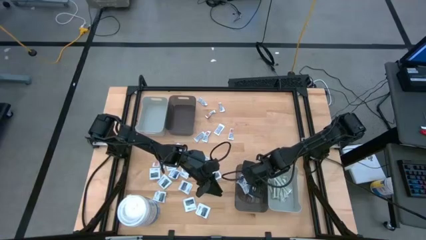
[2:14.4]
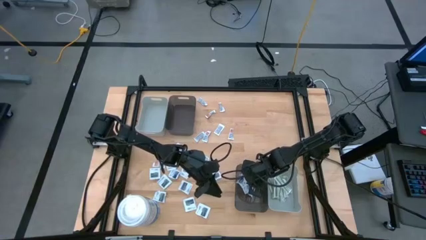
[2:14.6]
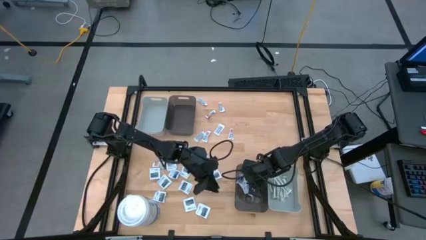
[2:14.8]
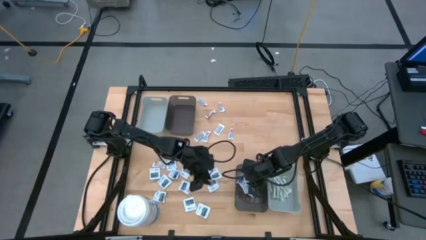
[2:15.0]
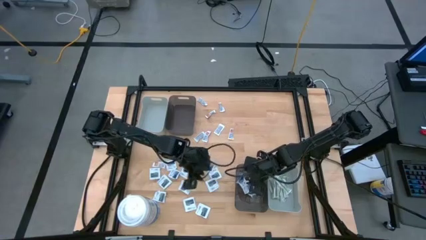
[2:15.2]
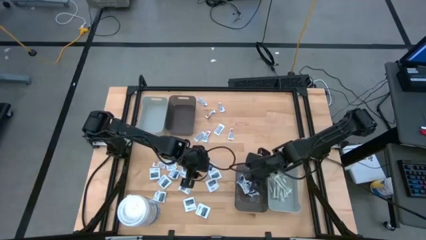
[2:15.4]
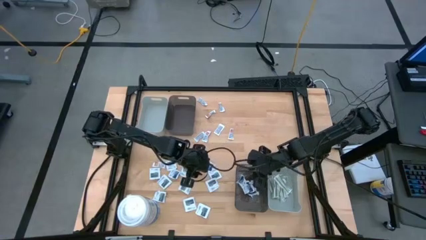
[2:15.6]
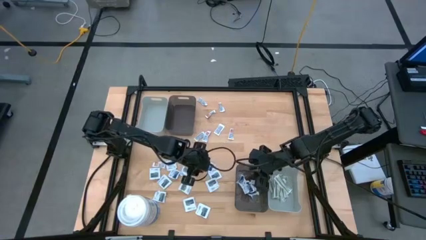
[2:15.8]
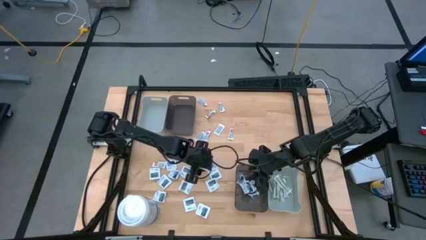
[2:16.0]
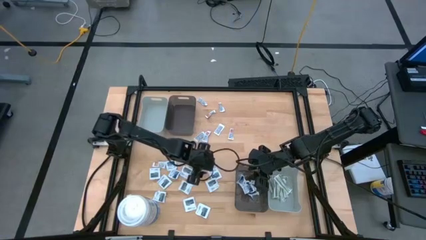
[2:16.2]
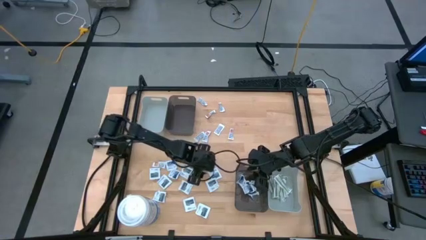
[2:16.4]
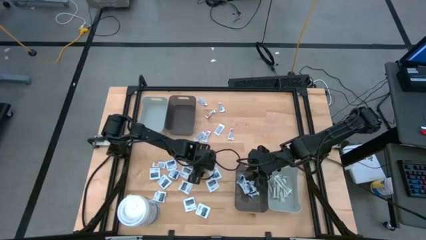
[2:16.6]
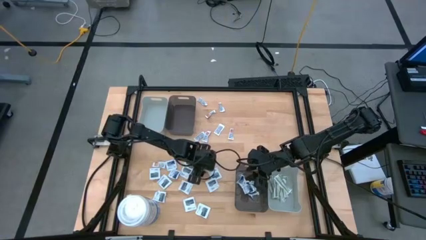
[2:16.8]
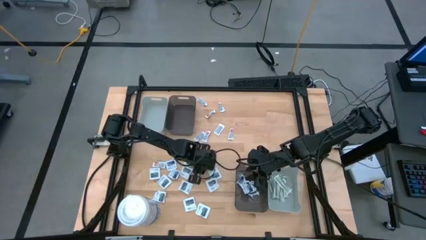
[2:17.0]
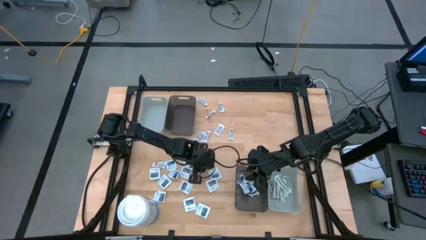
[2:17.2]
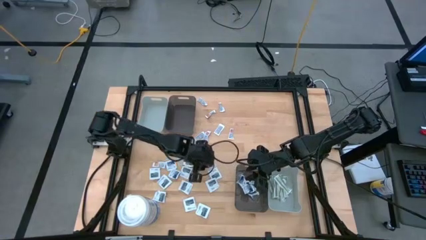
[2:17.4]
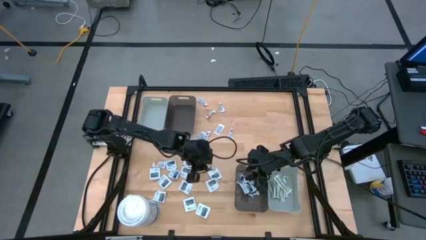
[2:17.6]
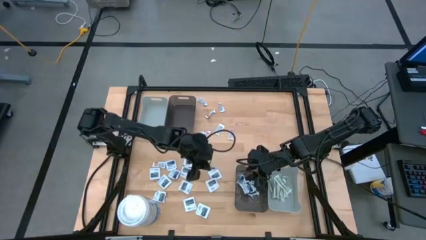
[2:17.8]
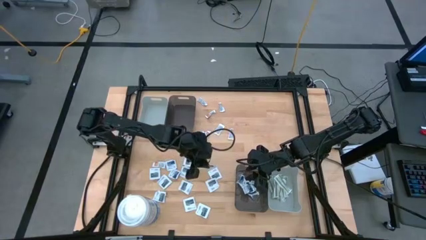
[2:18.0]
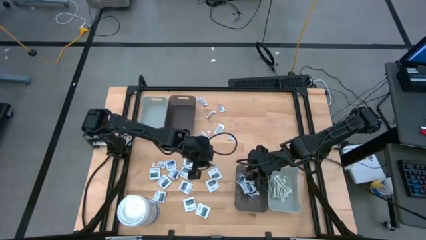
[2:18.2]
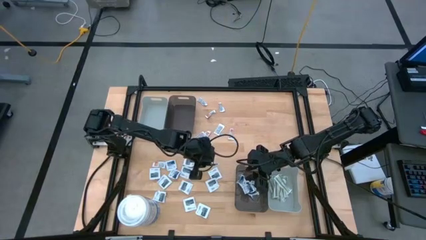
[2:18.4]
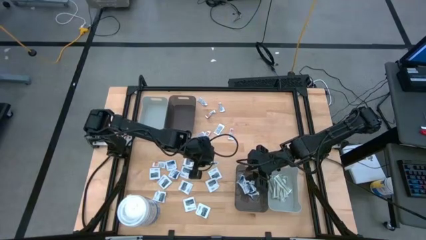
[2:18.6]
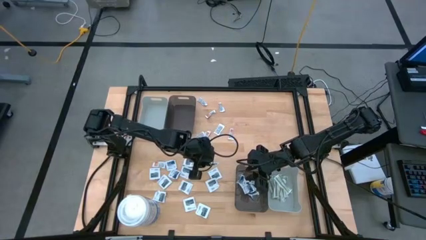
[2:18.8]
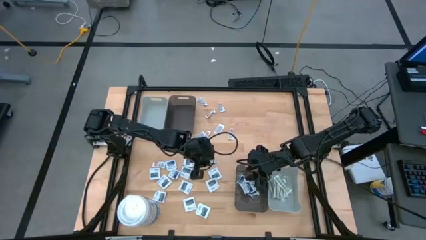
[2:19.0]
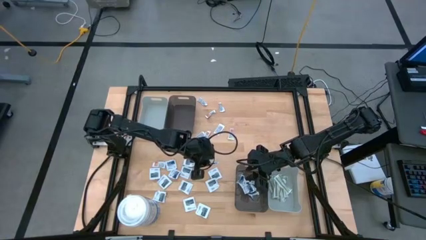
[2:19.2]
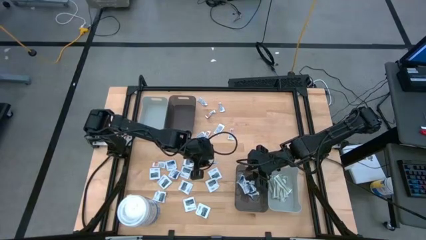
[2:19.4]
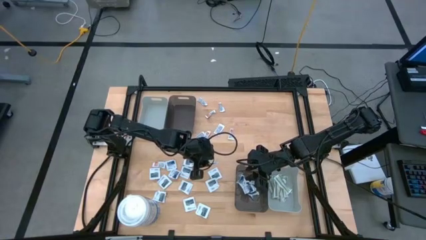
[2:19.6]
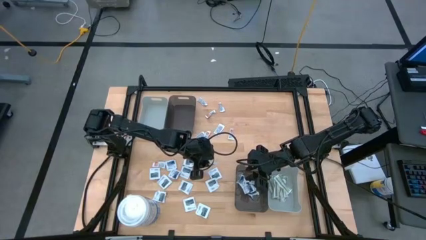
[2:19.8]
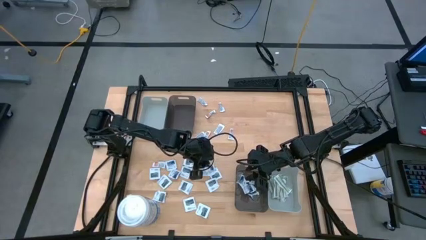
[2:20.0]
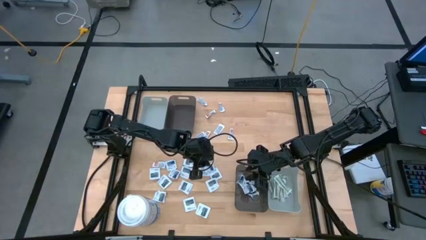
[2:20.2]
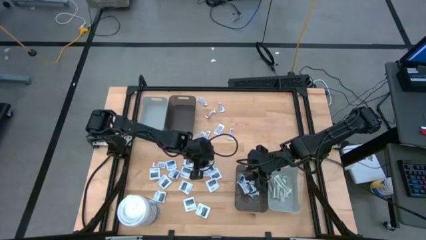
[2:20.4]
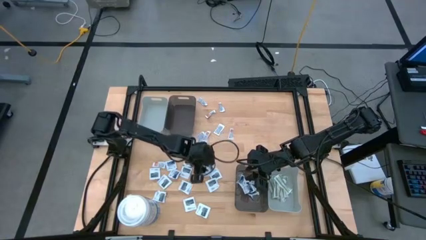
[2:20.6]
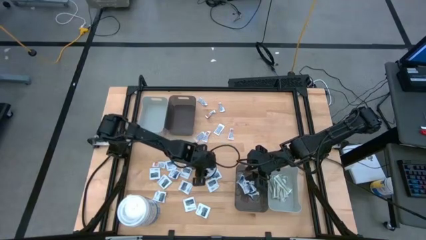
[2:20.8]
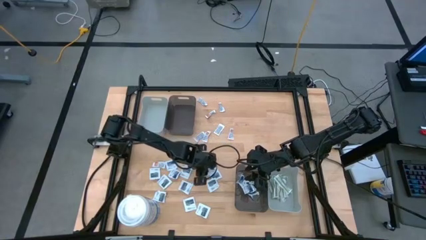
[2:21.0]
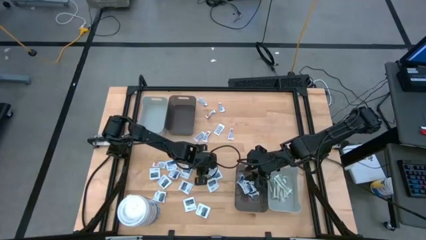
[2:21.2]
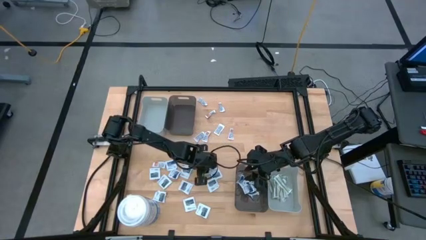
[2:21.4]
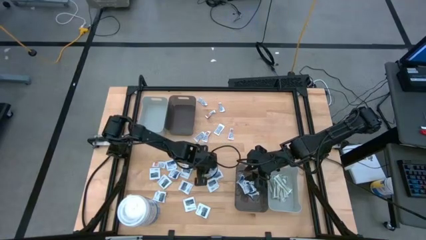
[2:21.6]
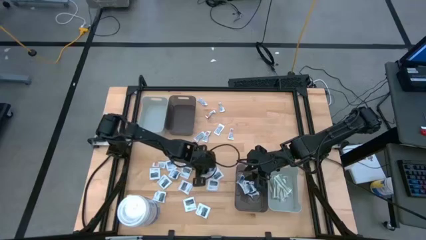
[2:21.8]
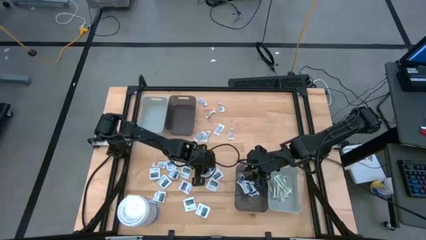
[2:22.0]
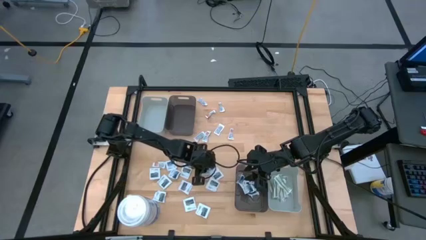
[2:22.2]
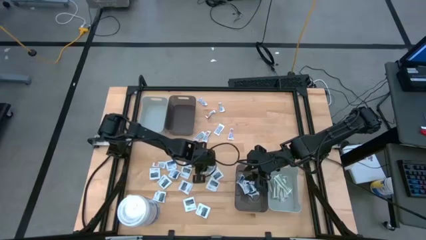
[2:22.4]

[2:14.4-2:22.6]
Task: Pick & Place First Aid Supplies
Put the white alcohol pad into the bottom black bin

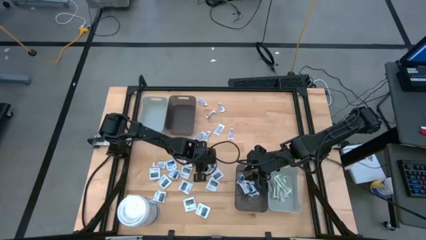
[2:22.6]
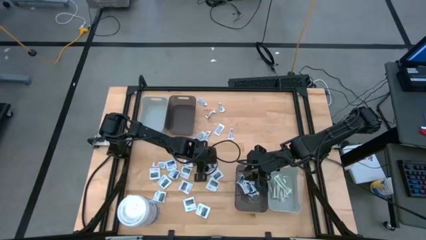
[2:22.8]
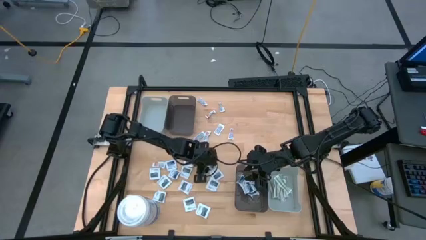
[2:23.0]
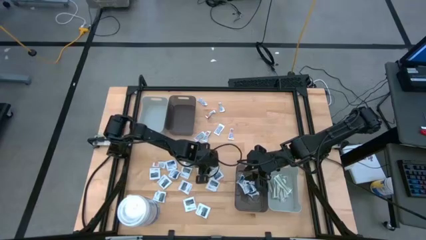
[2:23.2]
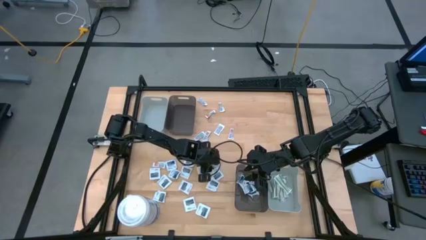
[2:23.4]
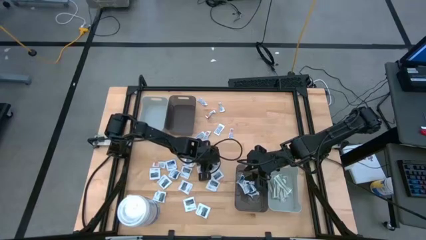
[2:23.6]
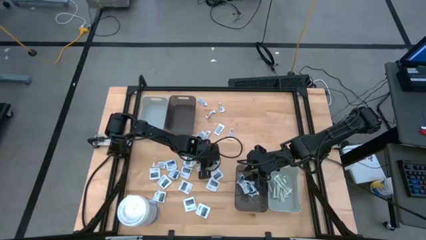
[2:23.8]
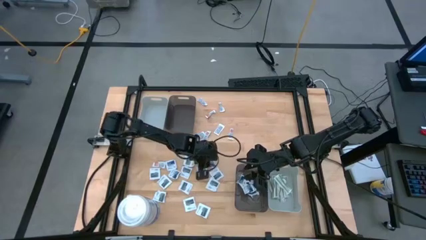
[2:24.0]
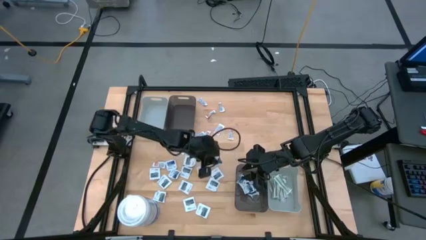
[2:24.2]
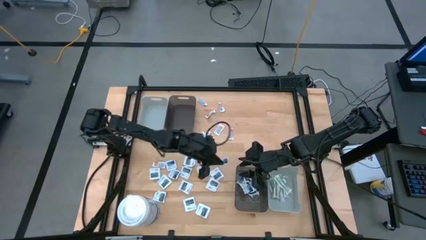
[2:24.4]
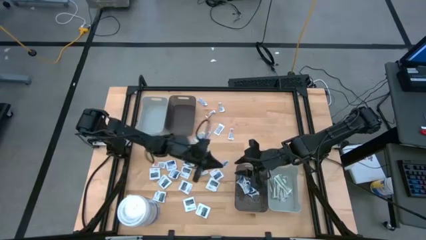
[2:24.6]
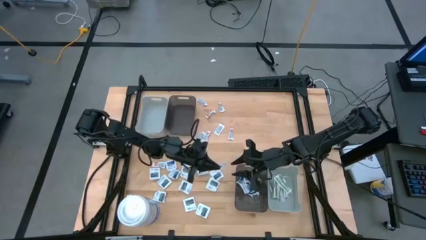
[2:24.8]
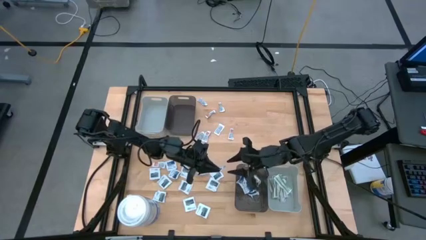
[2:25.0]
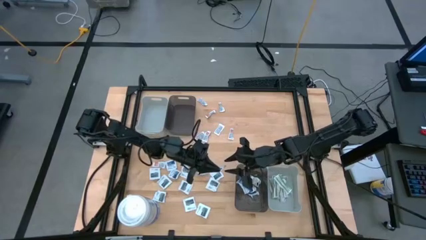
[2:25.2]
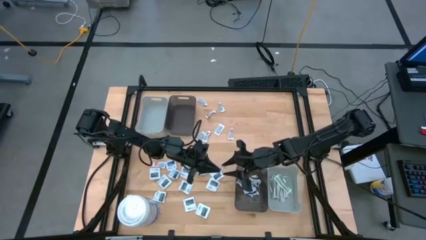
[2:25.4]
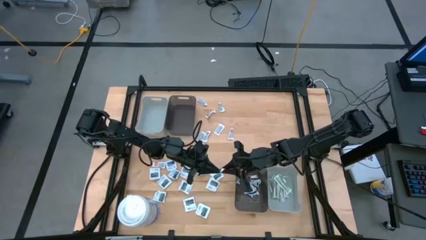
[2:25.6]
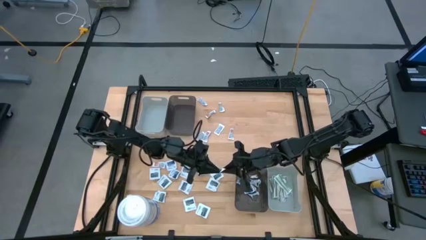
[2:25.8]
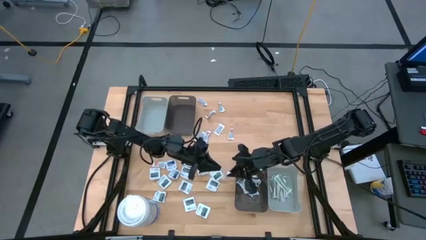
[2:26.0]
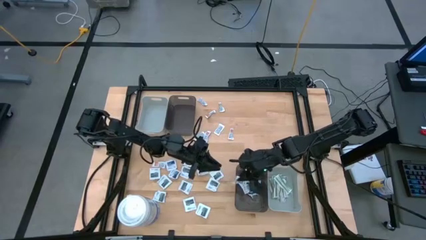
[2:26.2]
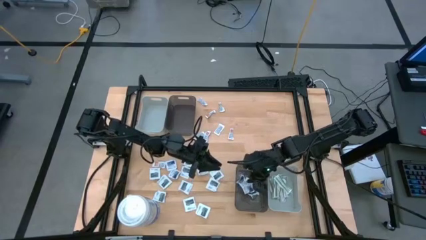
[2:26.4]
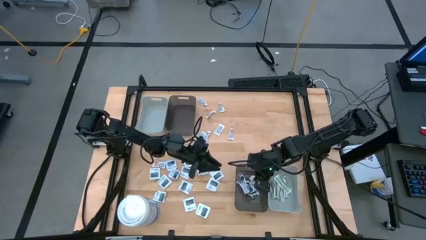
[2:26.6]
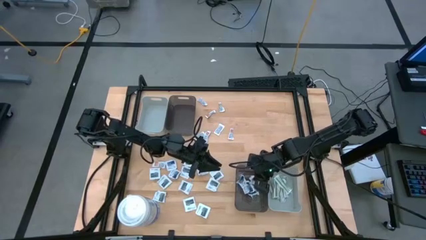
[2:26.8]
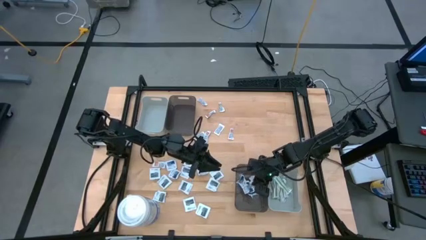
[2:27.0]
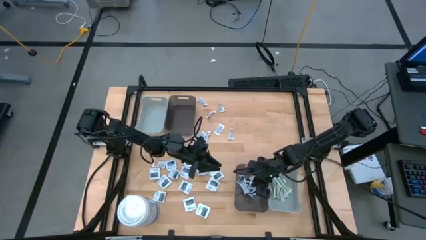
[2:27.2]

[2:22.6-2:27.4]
Put the white alcohol pad into the bottom black bin

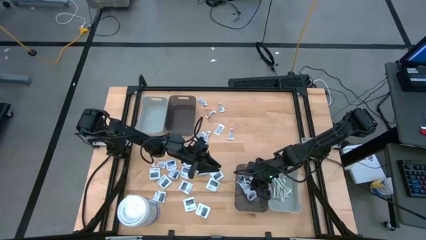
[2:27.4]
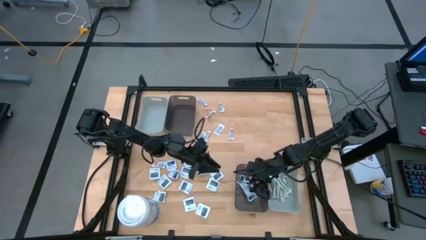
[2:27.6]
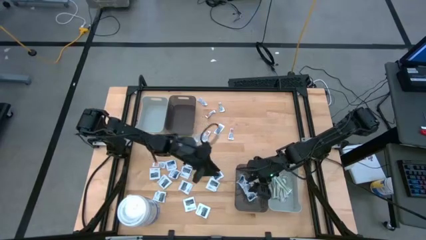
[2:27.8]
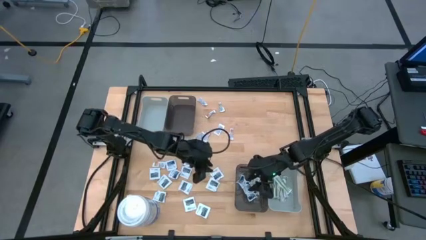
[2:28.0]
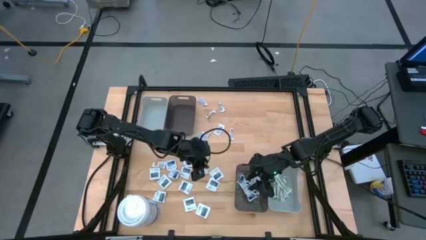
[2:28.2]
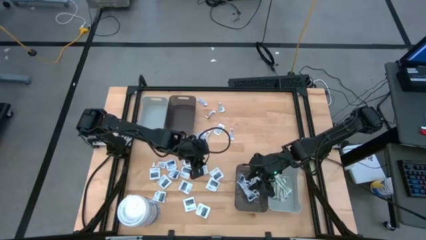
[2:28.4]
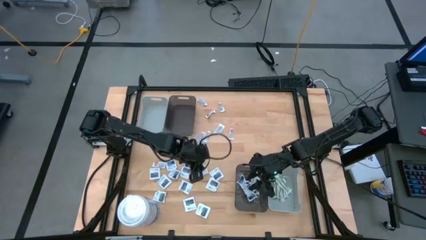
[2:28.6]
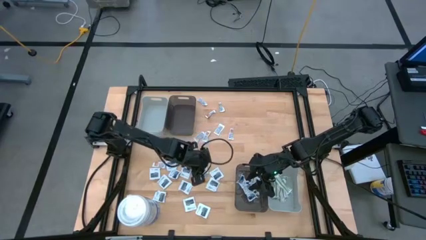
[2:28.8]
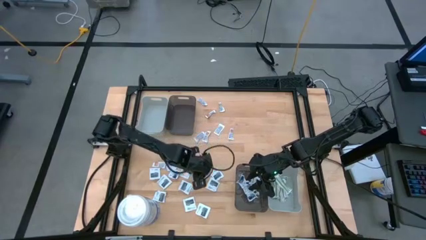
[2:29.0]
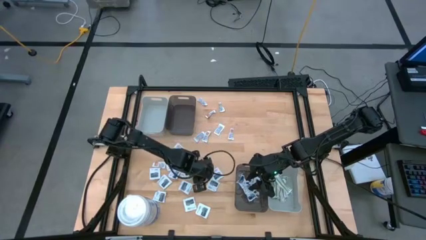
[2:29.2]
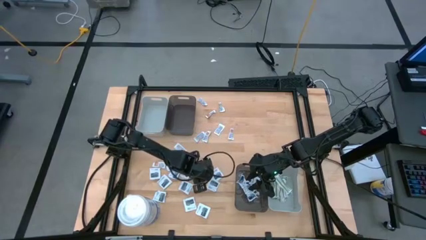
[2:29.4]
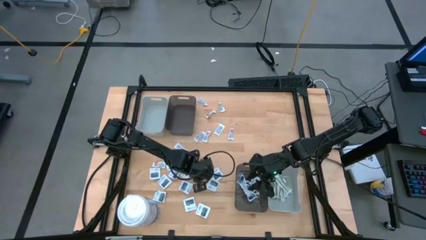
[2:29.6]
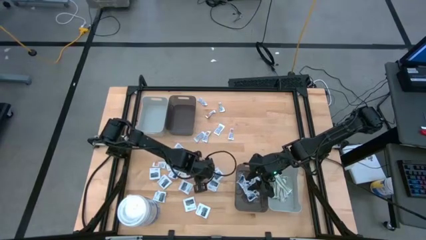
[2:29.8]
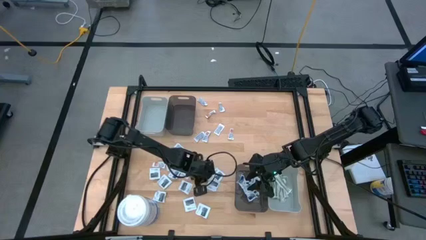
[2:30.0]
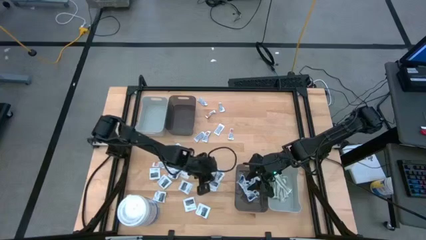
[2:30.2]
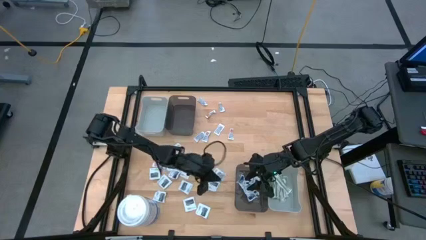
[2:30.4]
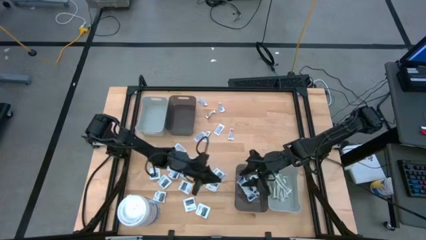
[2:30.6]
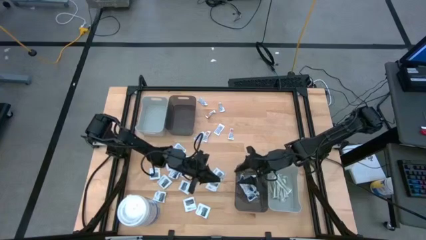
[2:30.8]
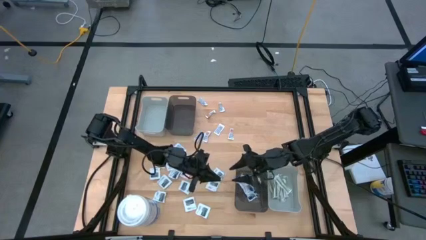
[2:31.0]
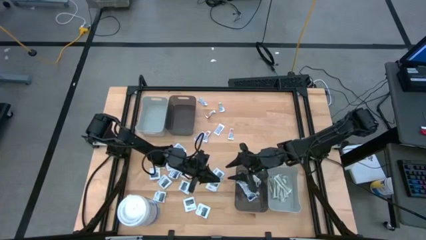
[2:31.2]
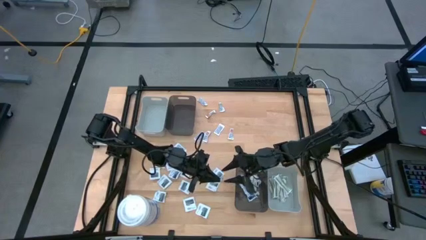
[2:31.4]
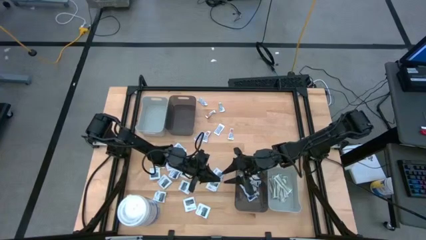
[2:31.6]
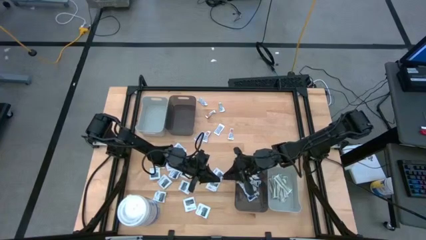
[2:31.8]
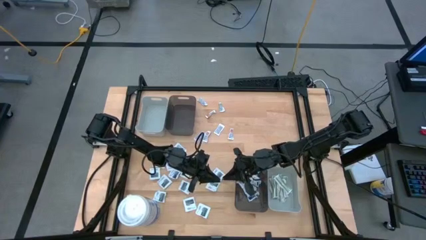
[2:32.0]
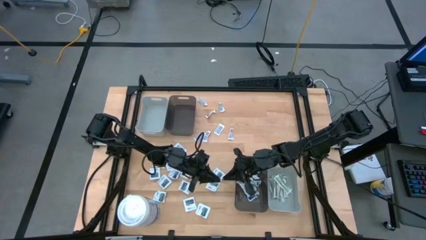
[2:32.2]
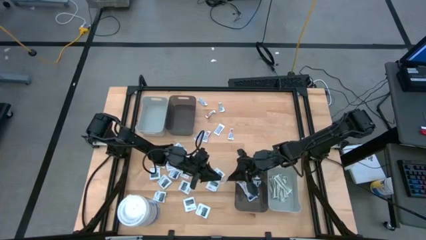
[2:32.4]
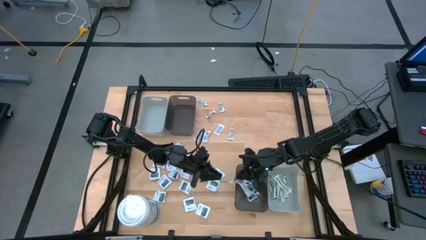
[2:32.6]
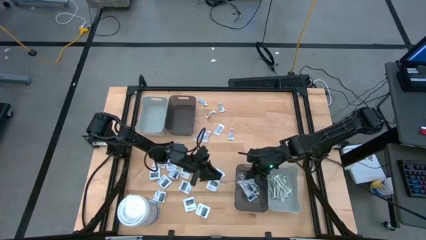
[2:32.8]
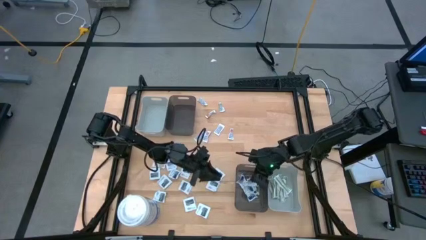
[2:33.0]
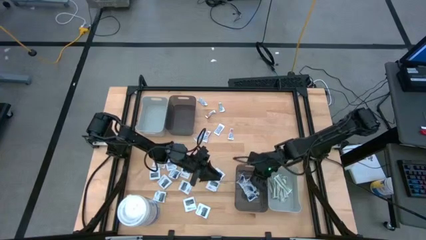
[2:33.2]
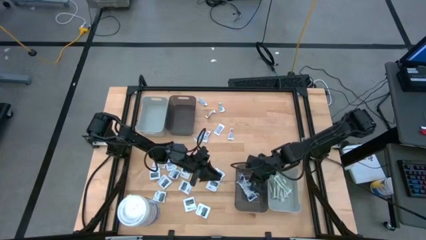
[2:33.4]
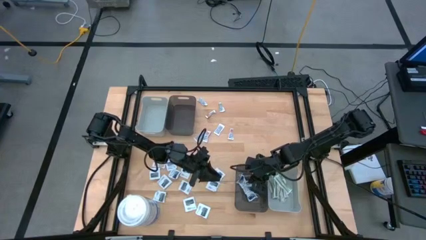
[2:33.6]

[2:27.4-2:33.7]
Put the white alcohol pad into the bottom black bin
